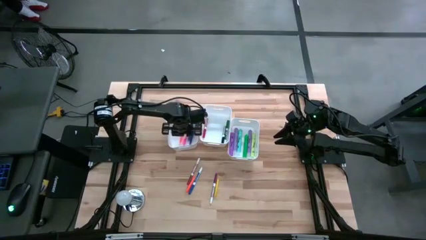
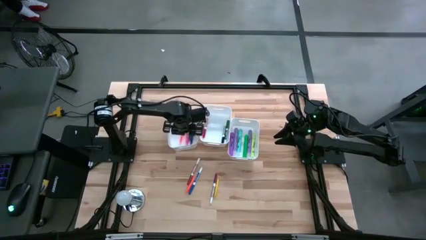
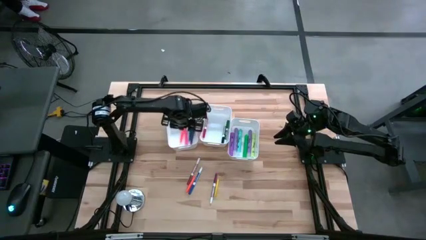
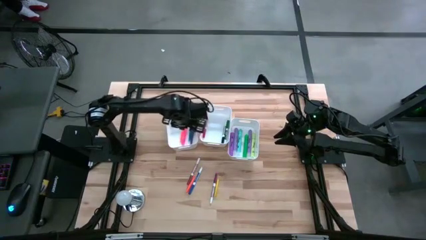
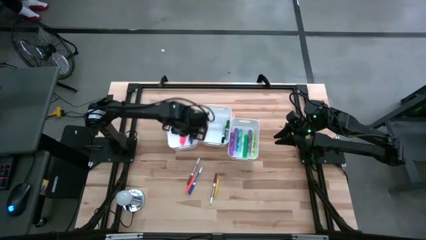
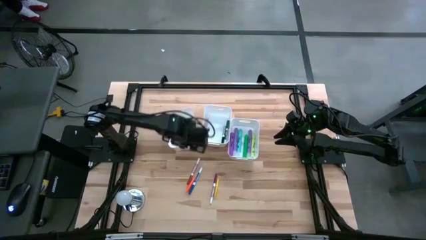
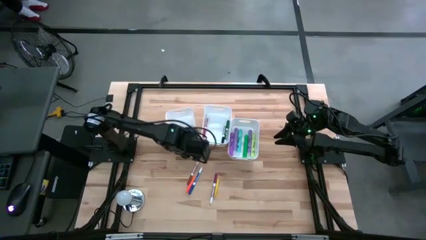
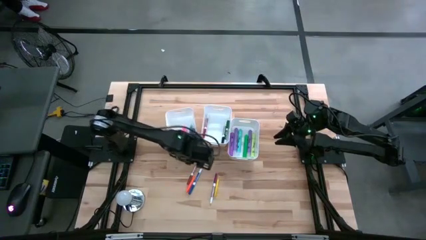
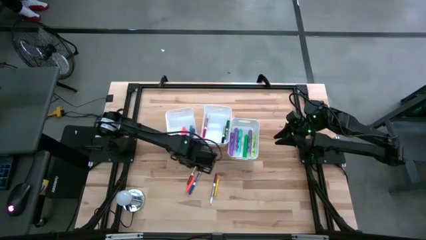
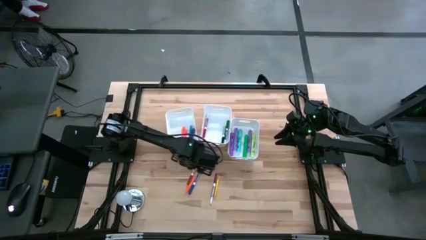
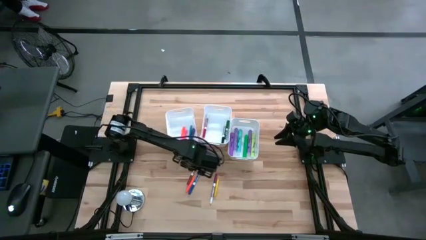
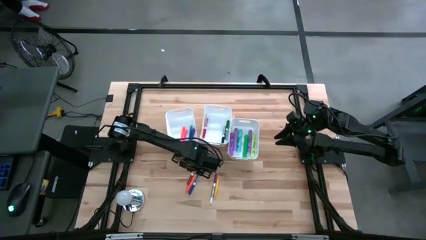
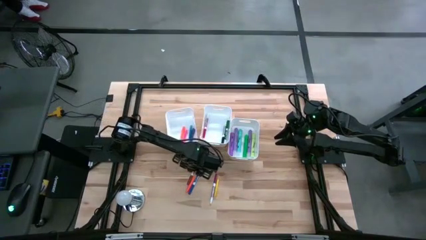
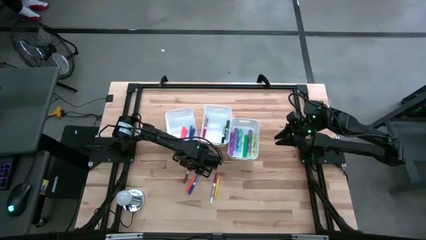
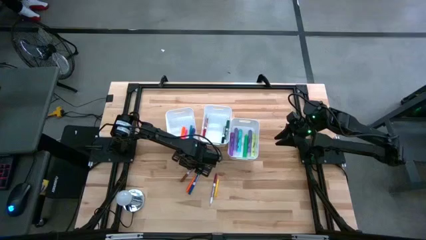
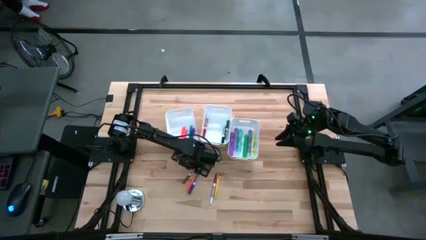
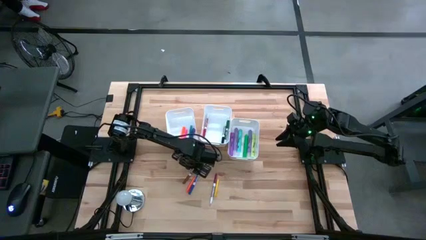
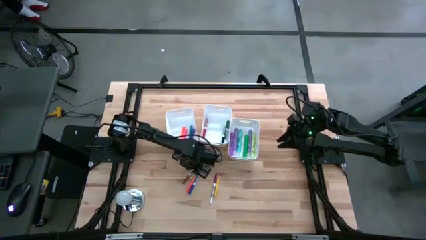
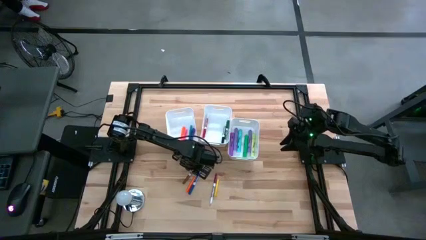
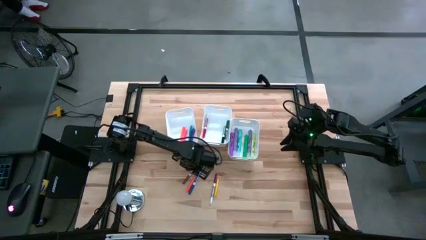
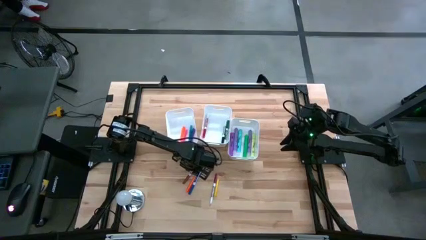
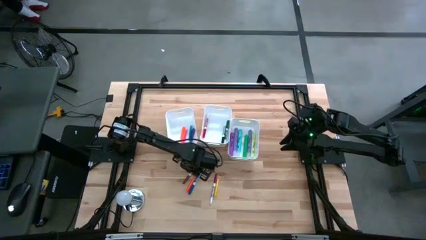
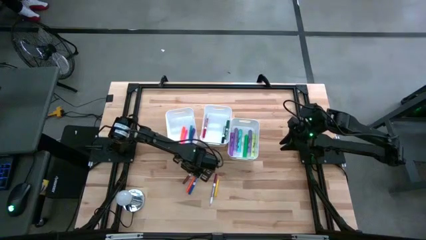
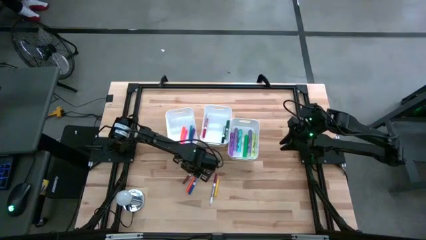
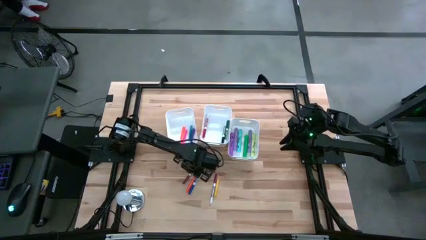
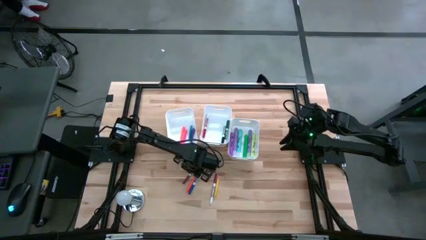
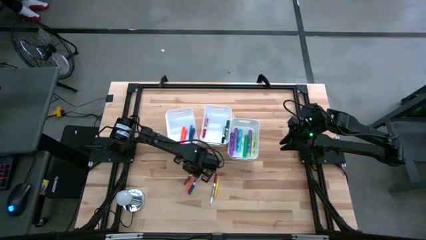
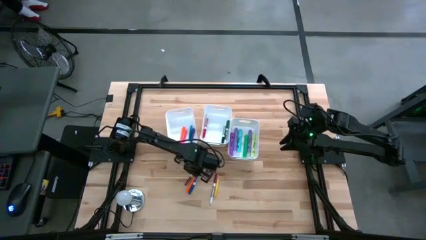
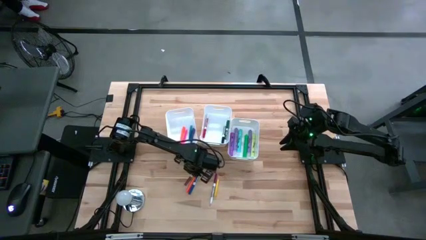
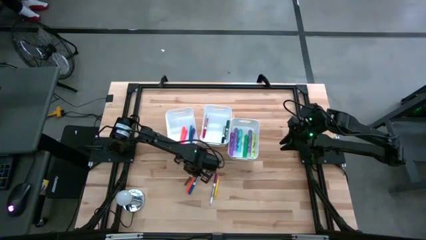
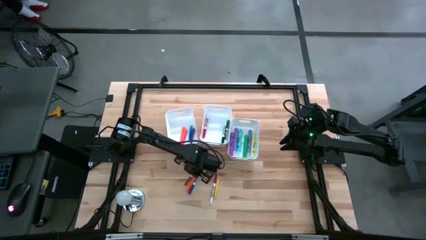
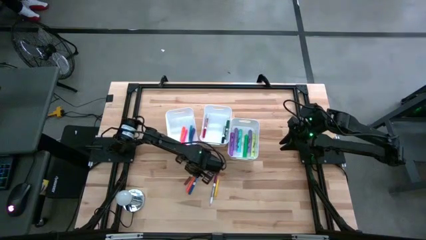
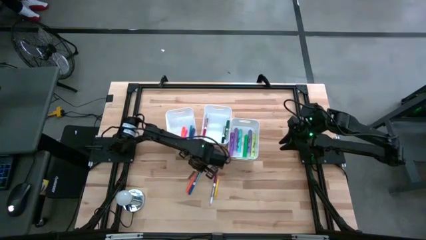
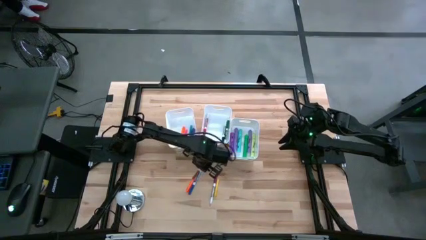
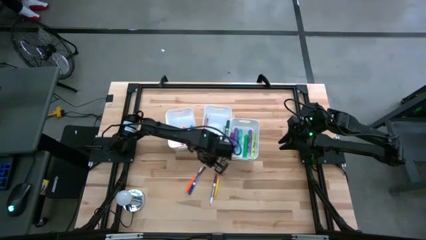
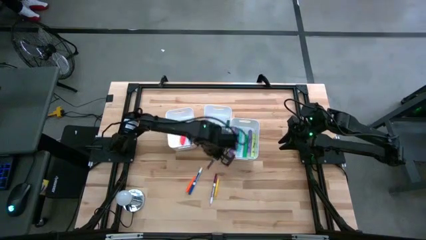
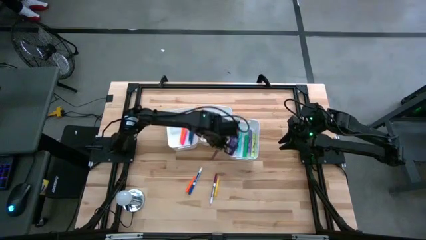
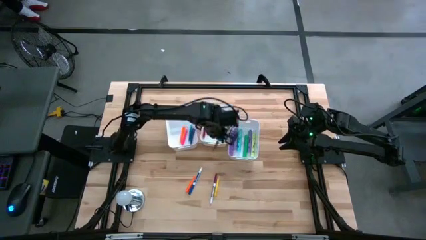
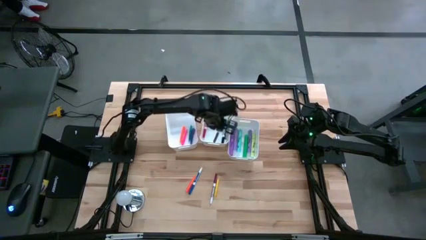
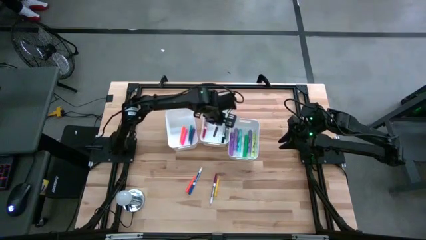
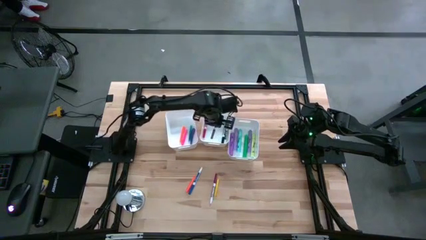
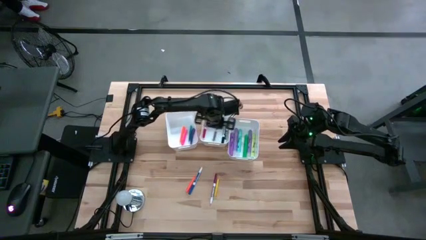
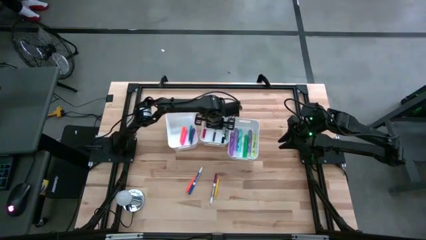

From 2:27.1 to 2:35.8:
Task: Pick & Place Markers
Put the brown marker into the middle white bin

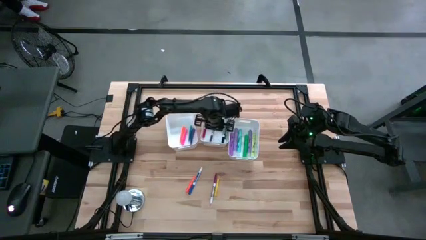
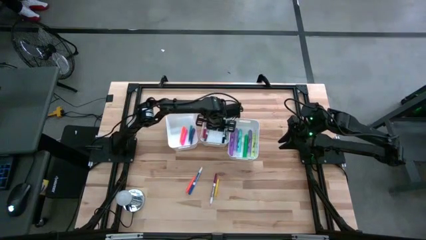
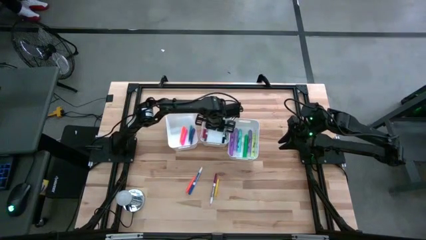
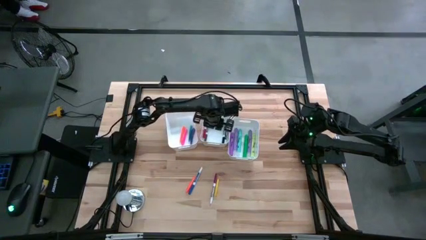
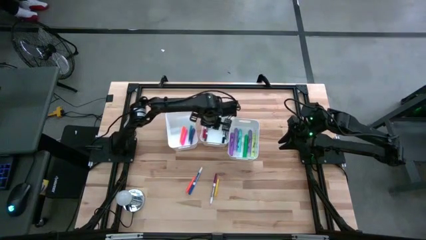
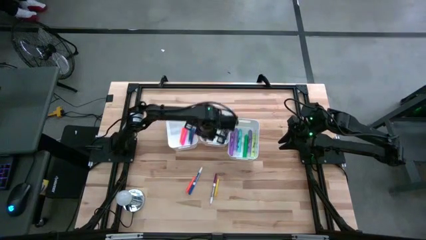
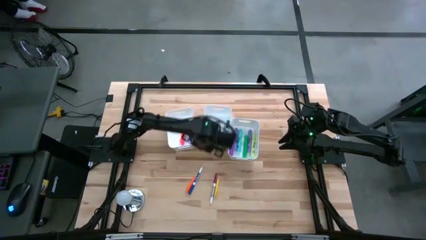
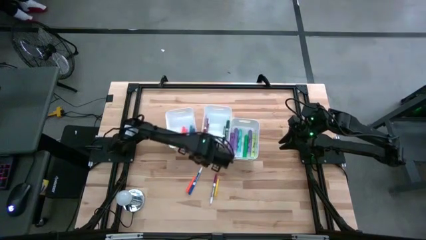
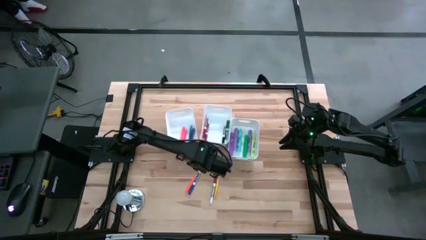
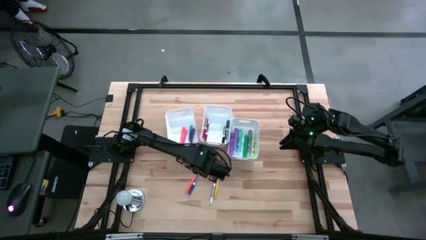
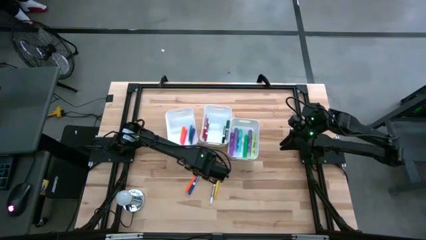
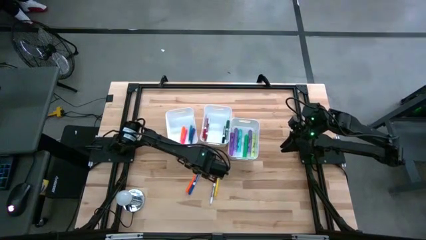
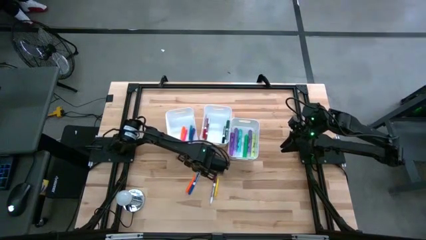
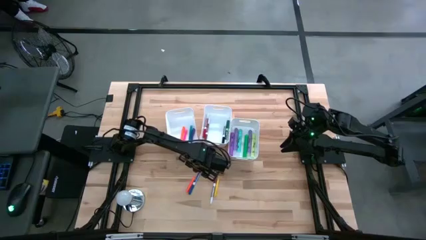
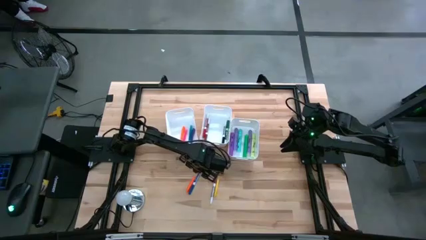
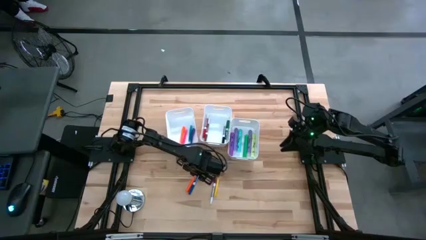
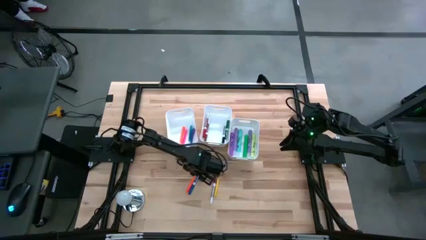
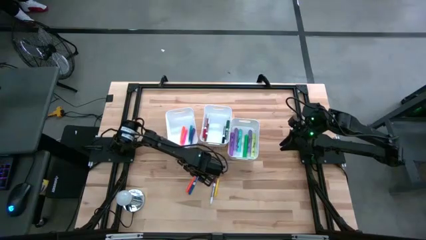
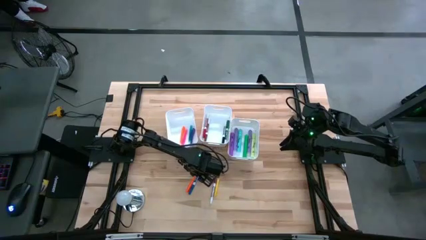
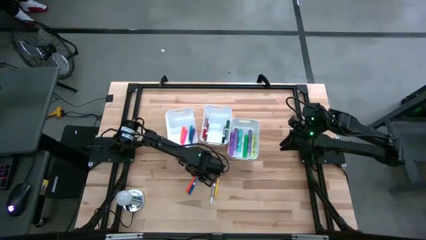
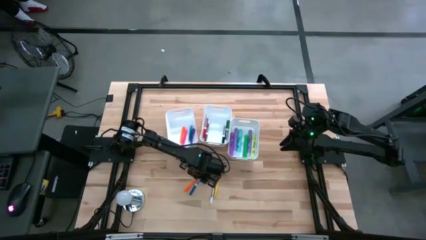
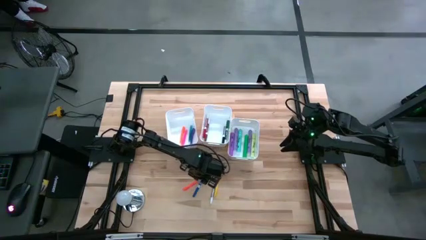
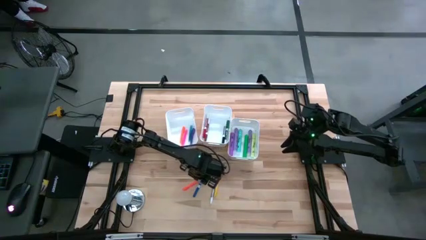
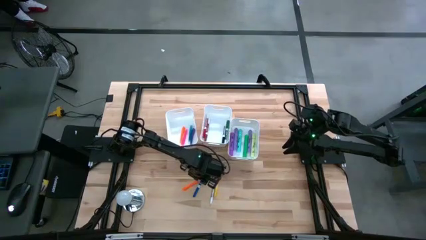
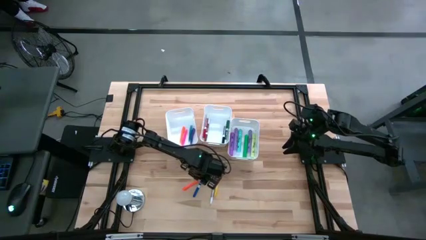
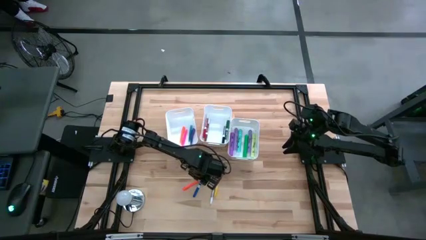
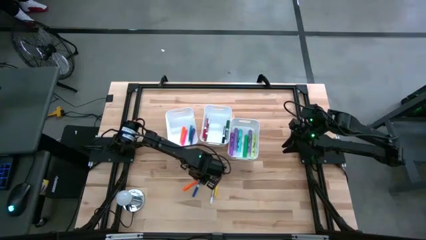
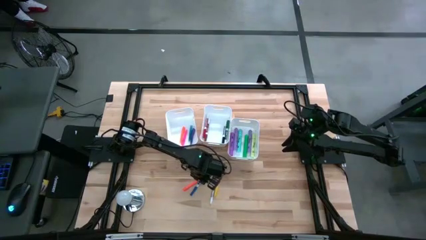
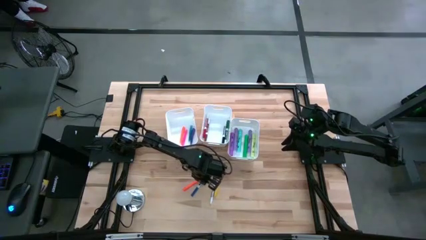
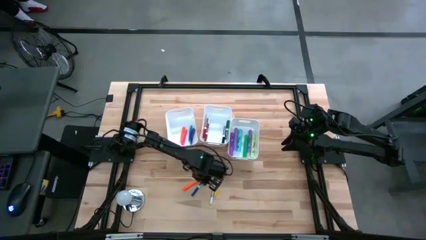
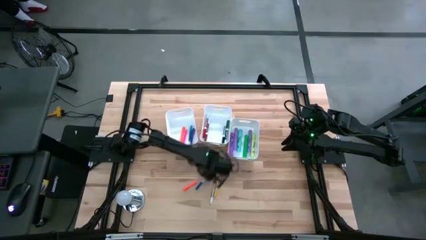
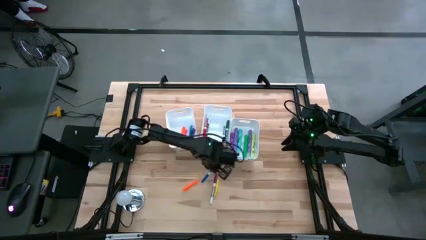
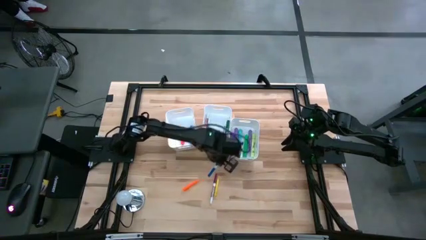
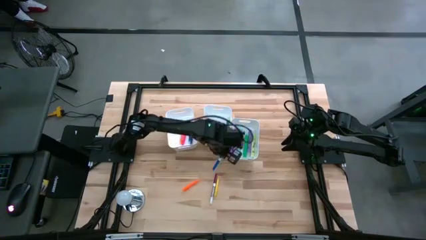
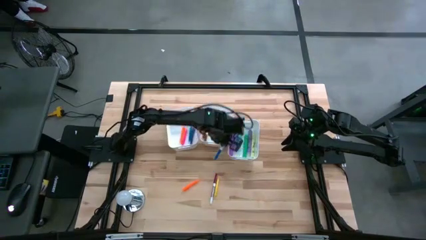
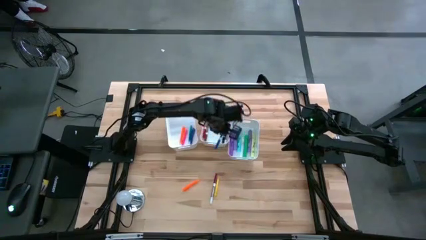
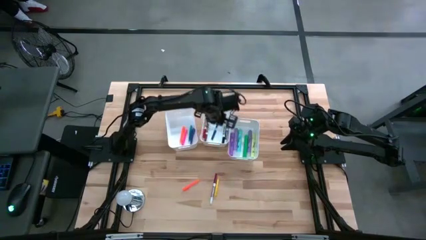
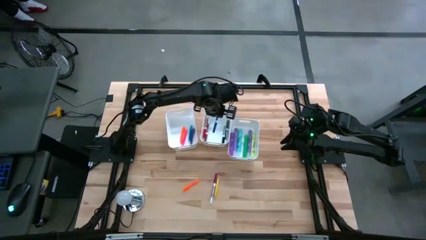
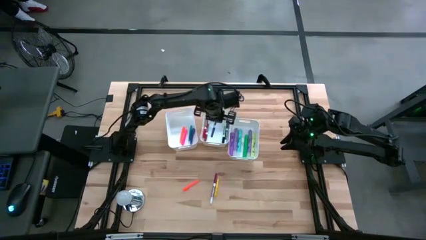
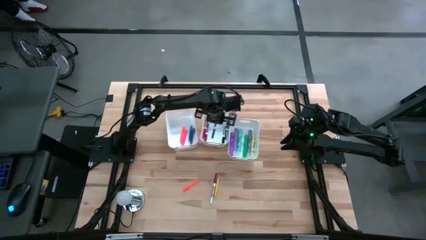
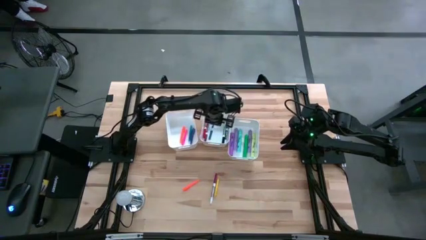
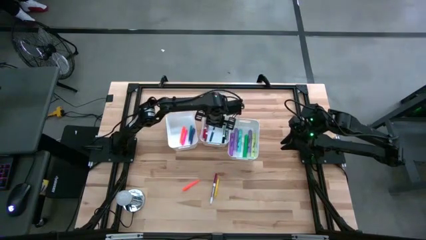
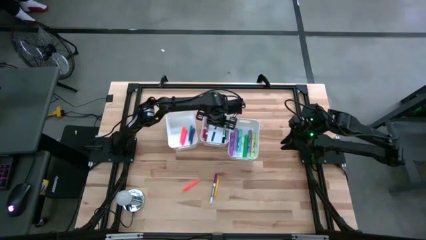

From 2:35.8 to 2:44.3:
Put the blue marker into the middle white bin
